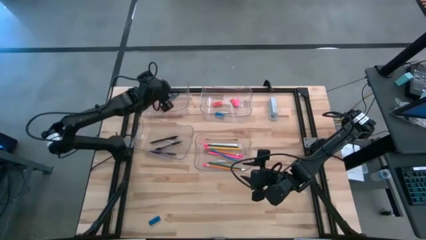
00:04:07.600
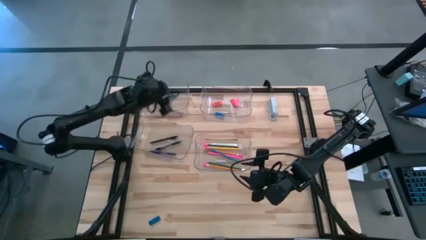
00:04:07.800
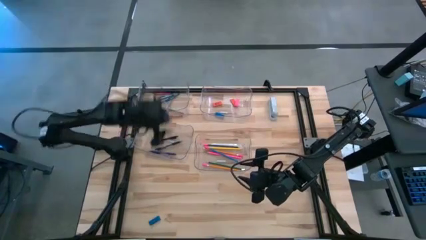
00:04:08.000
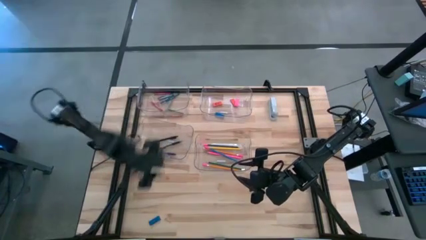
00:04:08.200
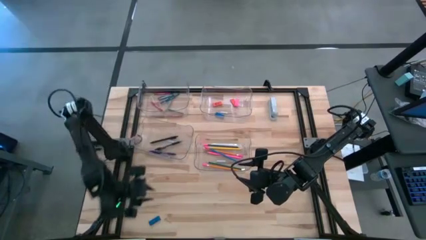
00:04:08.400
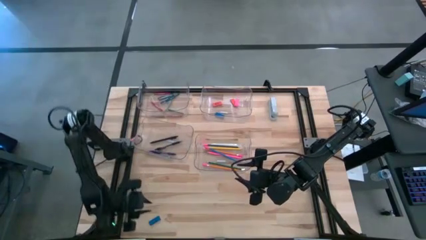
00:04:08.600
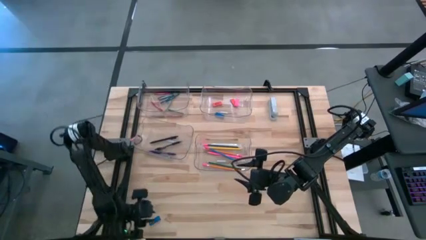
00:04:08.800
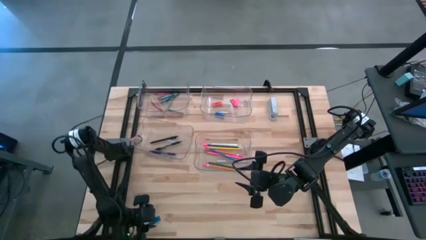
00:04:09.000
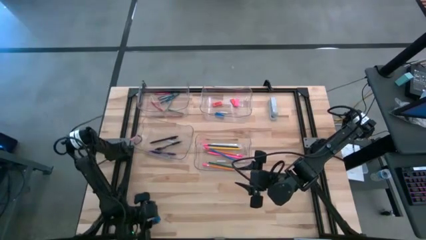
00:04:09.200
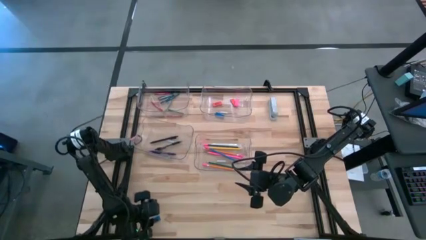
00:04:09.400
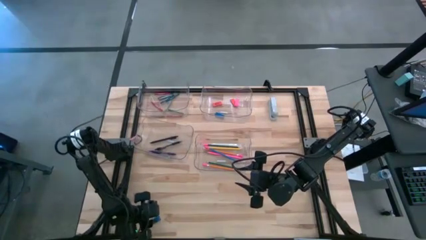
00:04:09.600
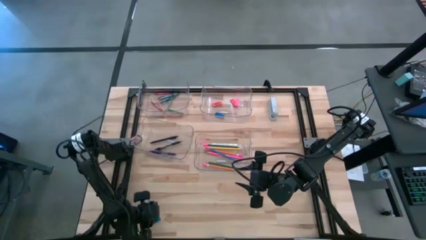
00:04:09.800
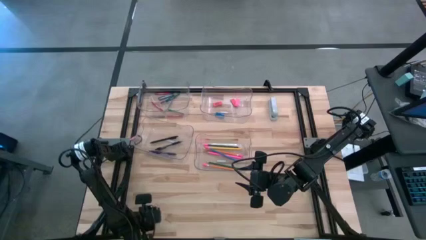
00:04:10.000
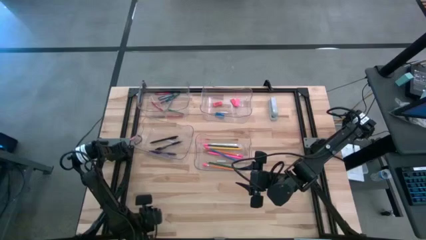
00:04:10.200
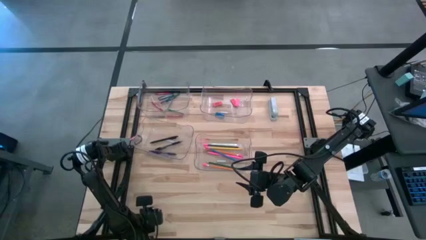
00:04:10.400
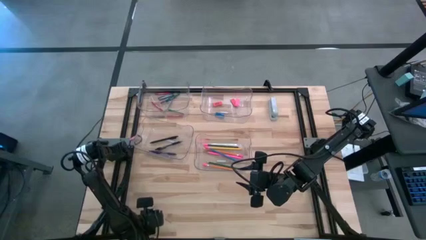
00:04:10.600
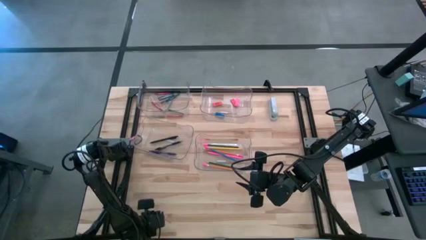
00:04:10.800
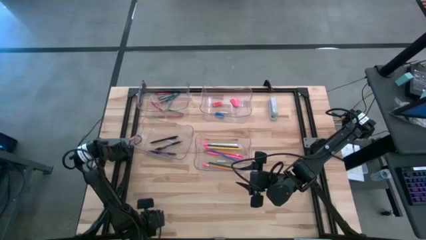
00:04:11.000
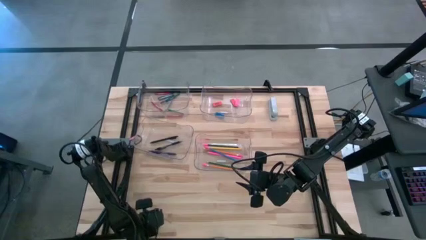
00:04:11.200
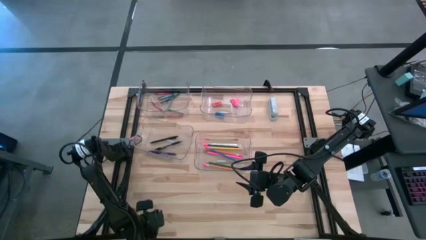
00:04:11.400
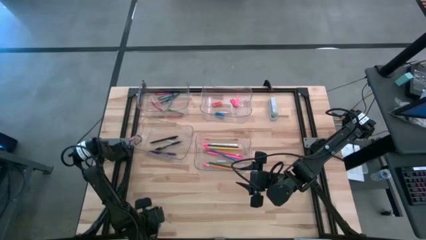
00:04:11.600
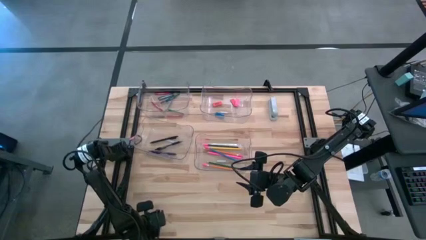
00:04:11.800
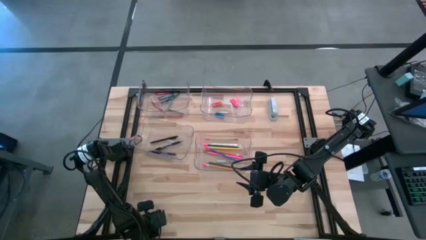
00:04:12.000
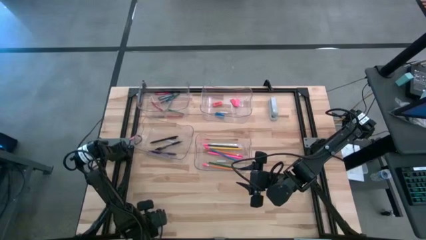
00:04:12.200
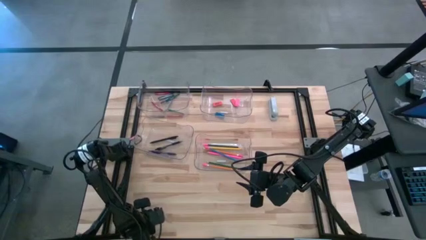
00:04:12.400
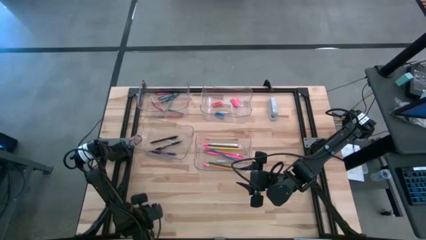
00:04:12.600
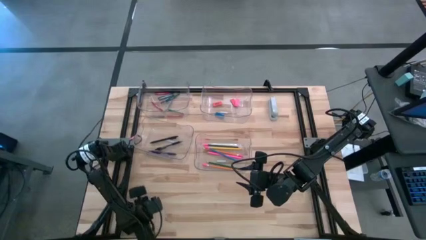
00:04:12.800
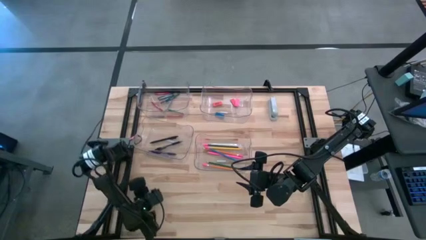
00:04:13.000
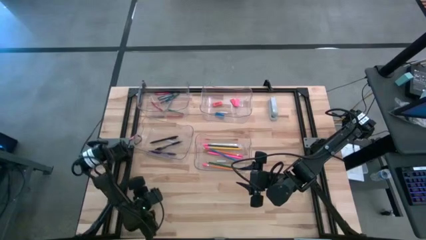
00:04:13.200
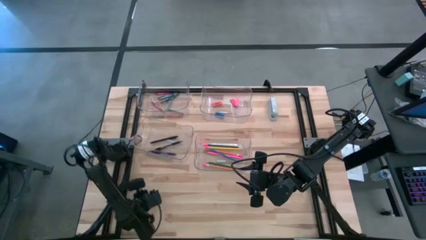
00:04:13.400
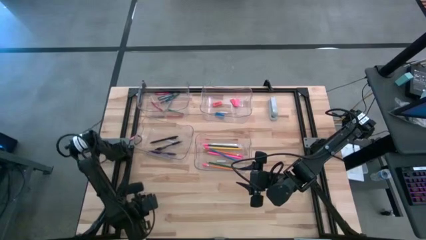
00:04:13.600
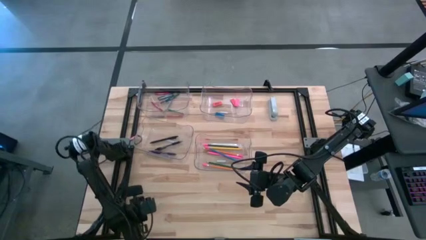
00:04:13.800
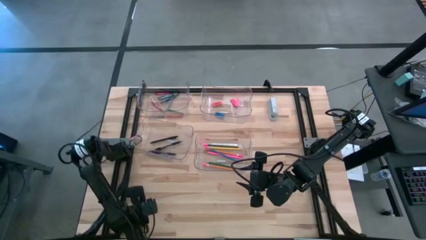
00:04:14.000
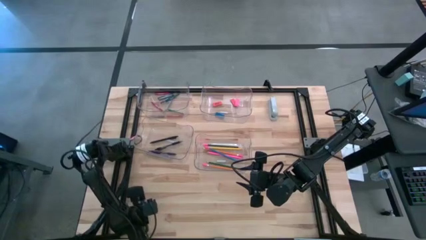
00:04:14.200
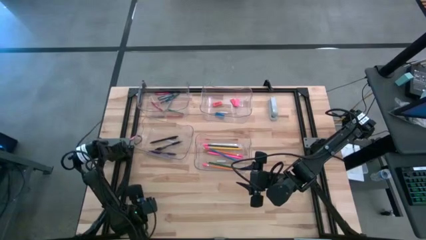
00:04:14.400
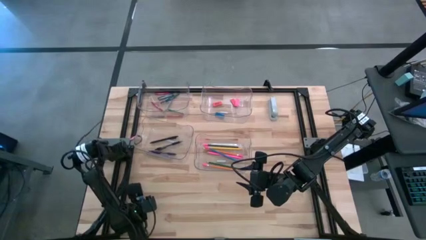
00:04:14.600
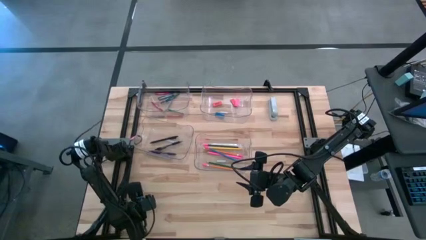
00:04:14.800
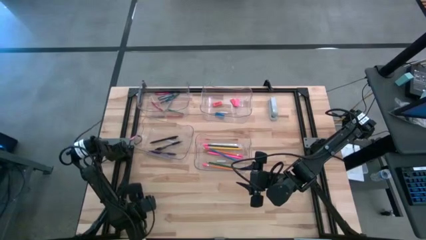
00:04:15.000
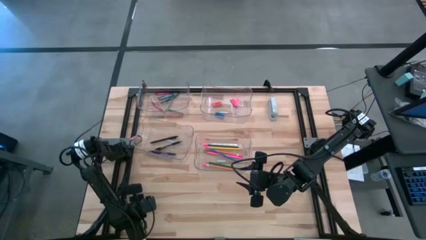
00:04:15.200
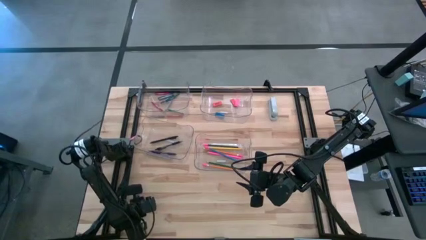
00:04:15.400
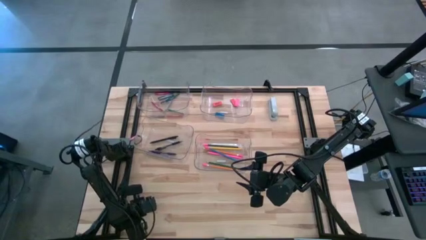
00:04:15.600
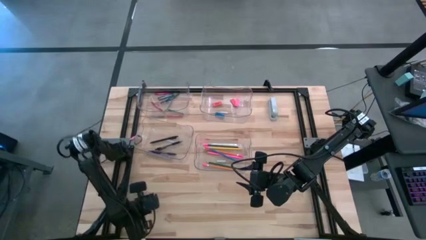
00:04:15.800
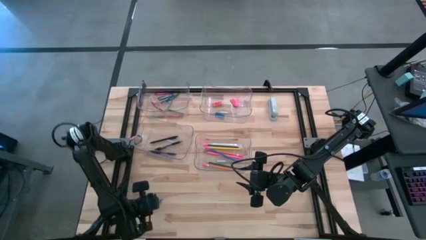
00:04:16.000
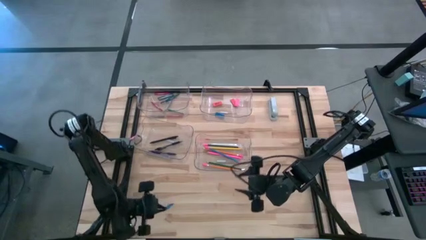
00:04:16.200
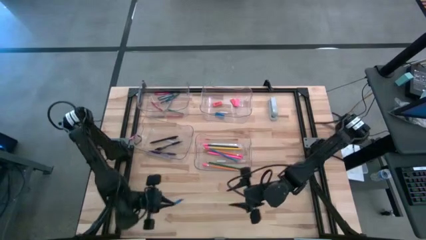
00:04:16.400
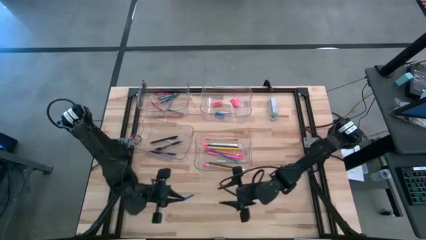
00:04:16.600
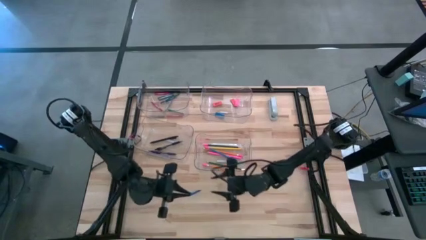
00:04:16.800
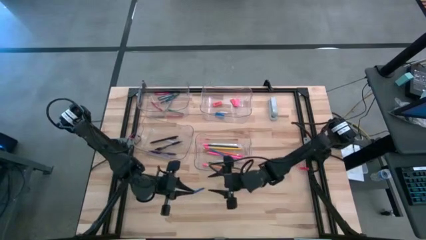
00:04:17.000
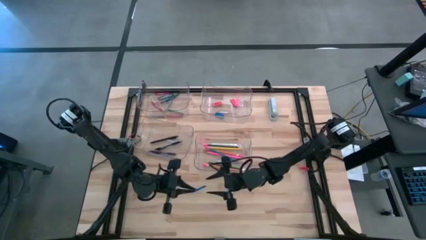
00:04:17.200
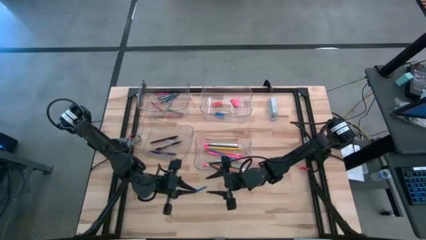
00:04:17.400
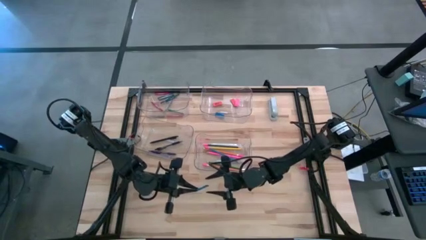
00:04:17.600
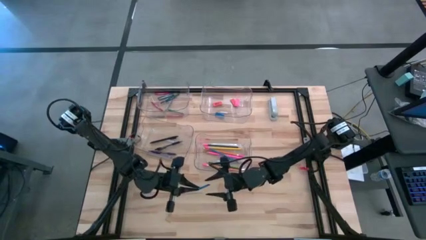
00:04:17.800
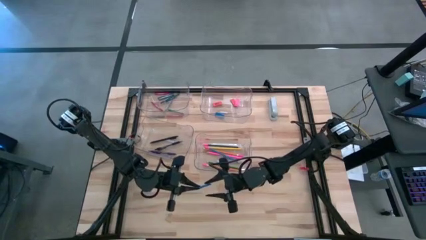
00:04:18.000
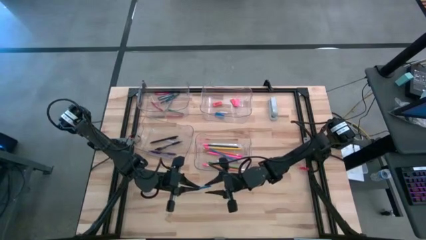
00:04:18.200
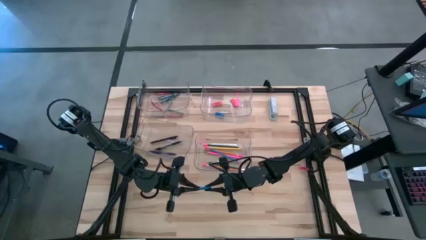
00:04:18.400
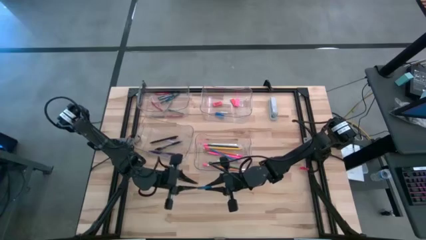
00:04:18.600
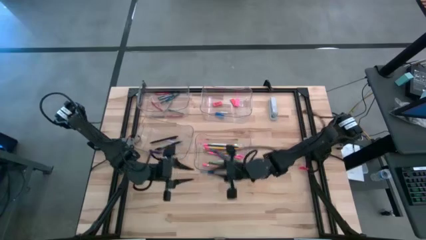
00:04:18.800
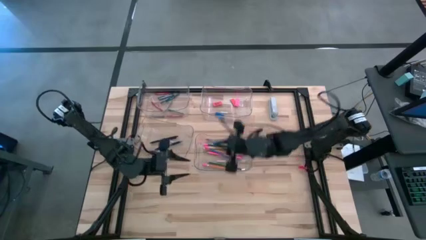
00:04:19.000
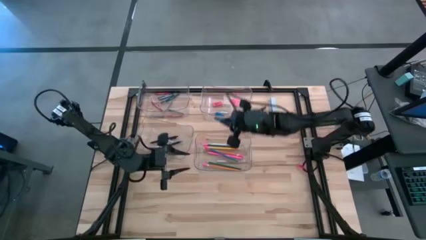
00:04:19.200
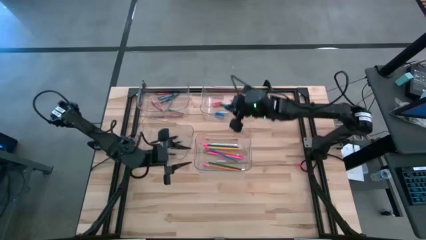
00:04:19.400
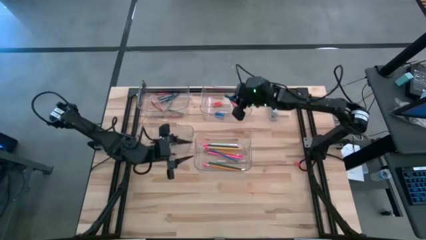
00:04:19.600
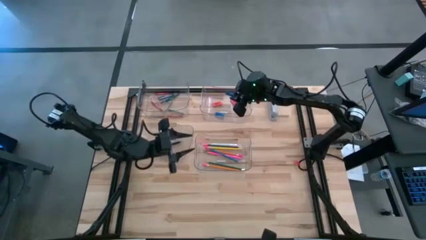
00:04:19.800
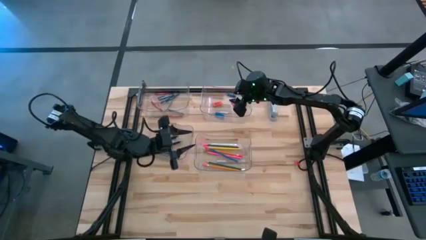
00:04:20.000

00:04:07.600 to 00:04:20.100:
Task: Sort crayons/erasers/pens/pencils in bins
Put the blue eraser into the top right transparent bin
